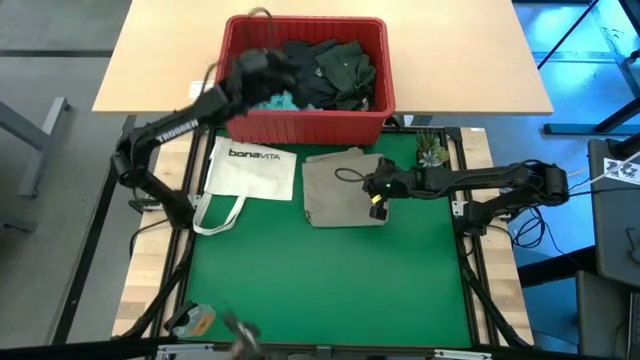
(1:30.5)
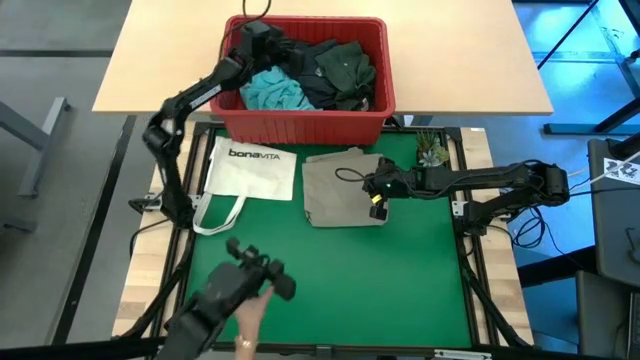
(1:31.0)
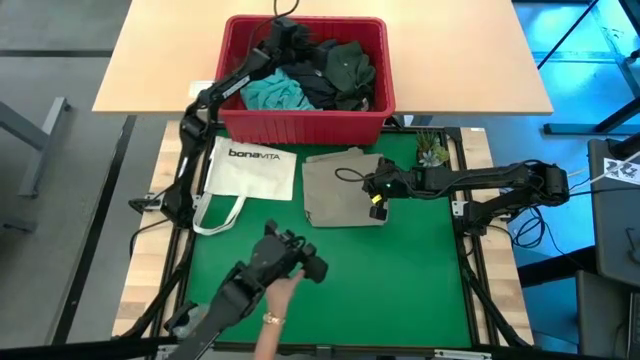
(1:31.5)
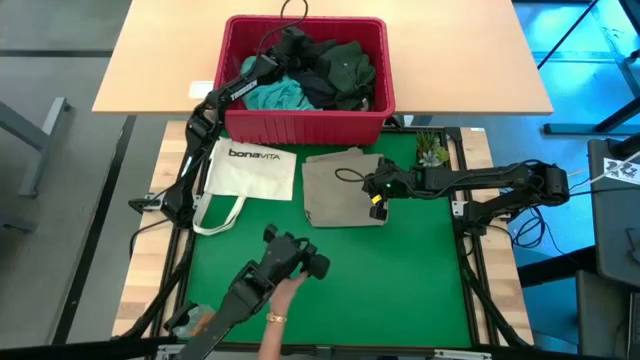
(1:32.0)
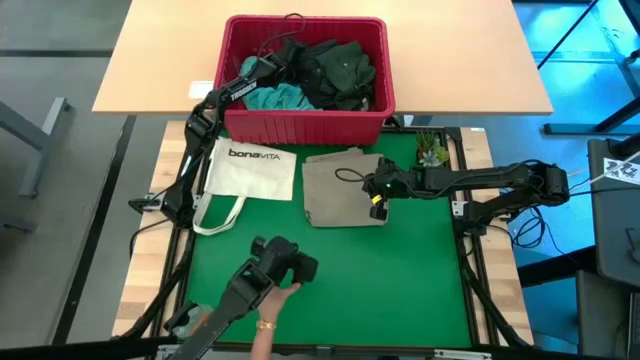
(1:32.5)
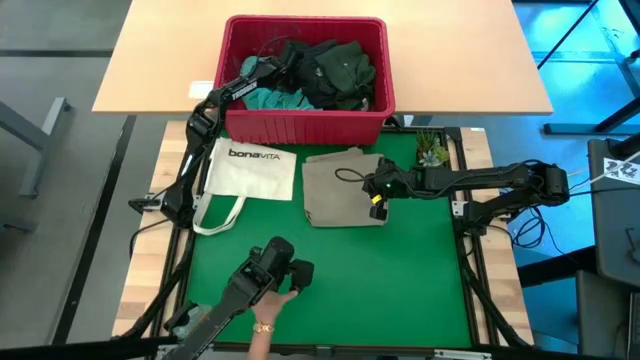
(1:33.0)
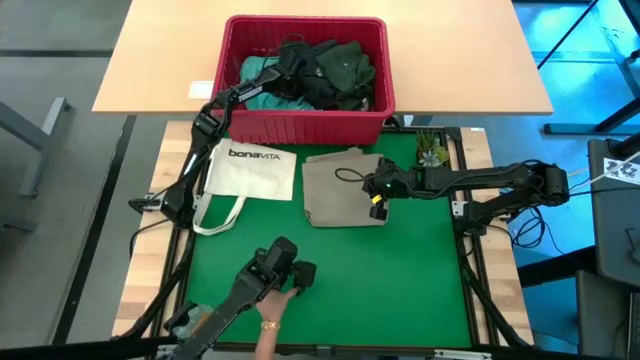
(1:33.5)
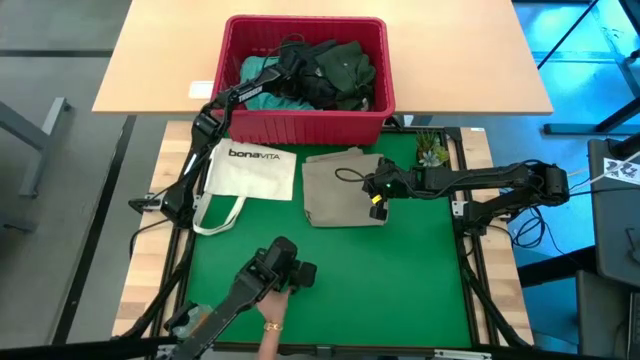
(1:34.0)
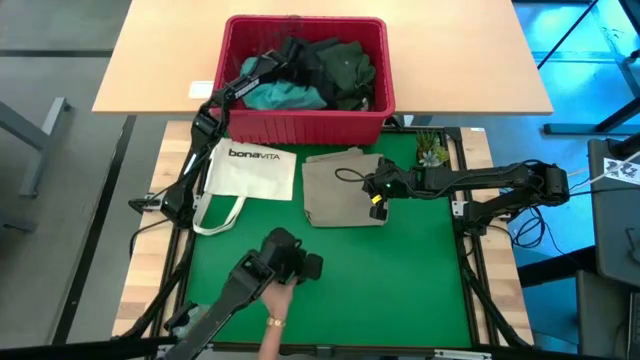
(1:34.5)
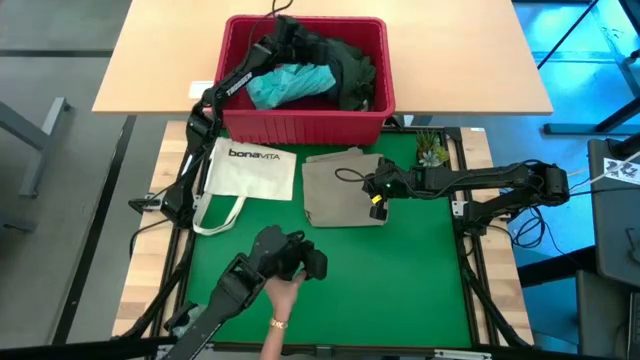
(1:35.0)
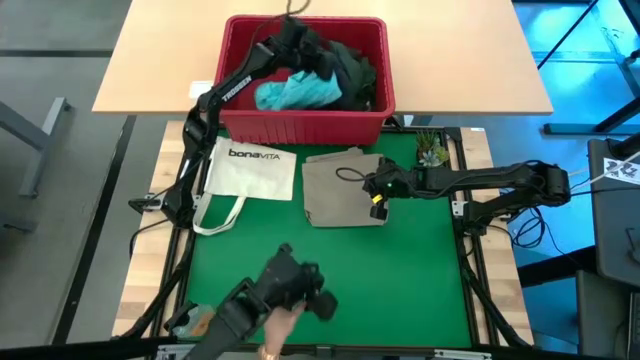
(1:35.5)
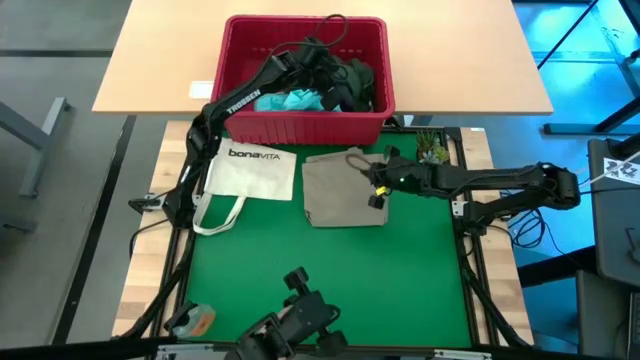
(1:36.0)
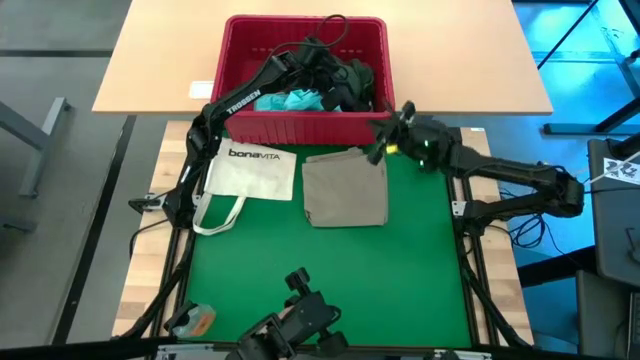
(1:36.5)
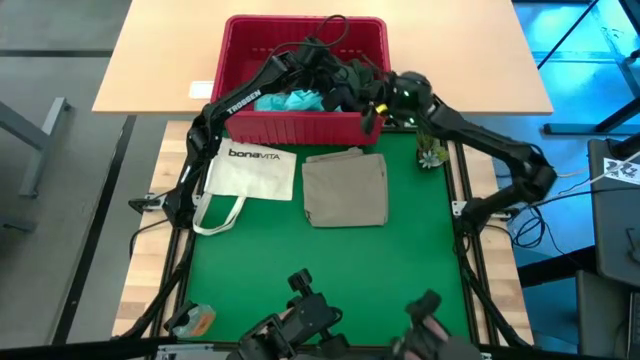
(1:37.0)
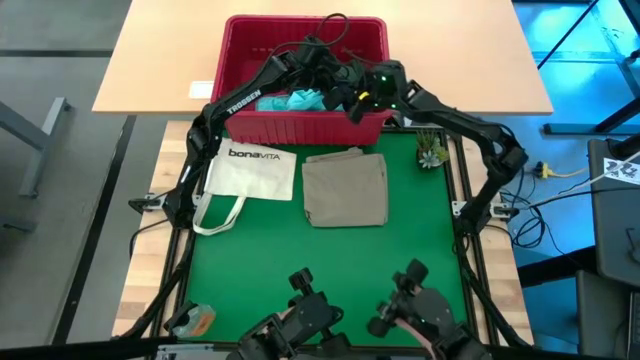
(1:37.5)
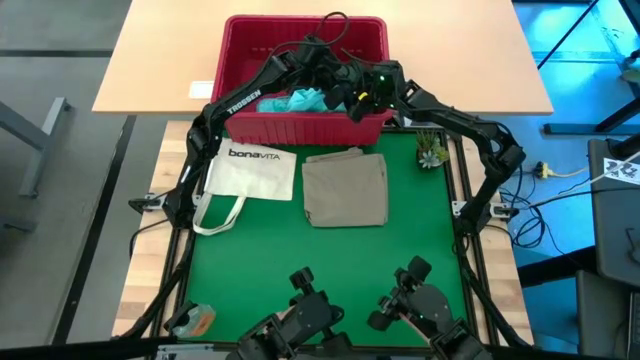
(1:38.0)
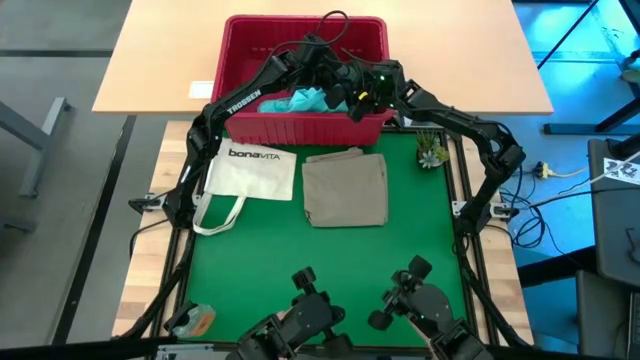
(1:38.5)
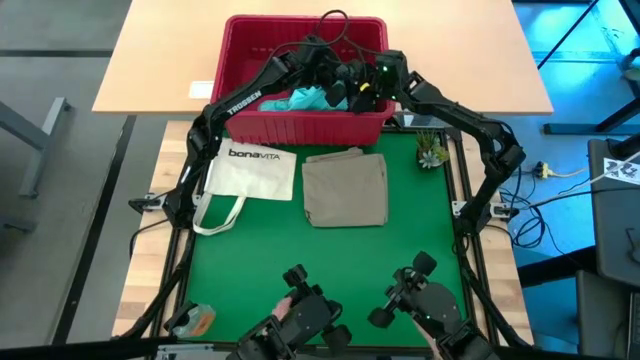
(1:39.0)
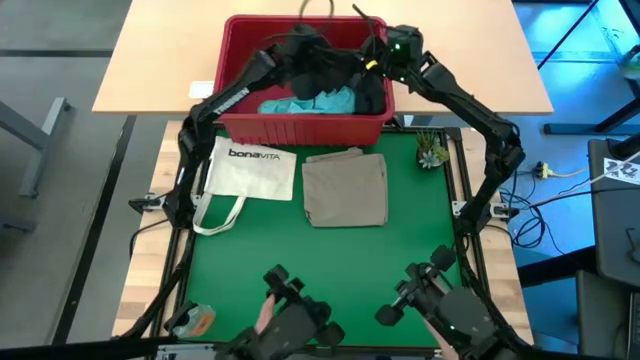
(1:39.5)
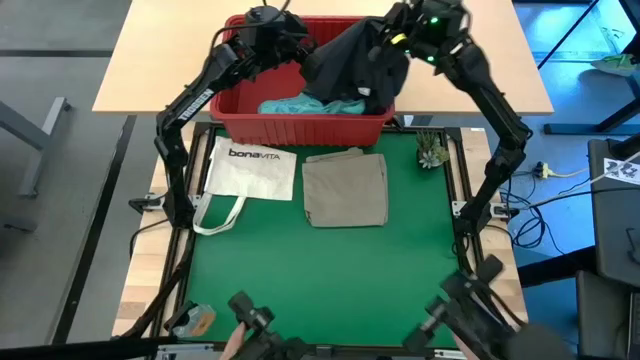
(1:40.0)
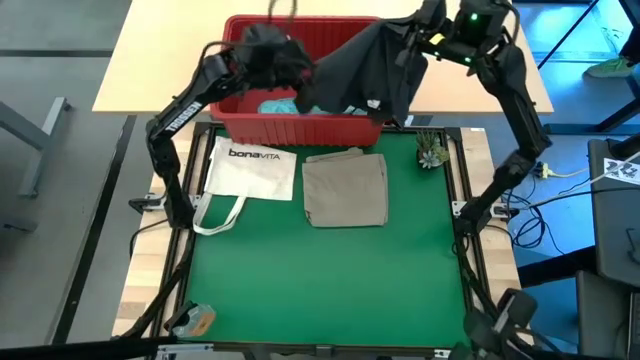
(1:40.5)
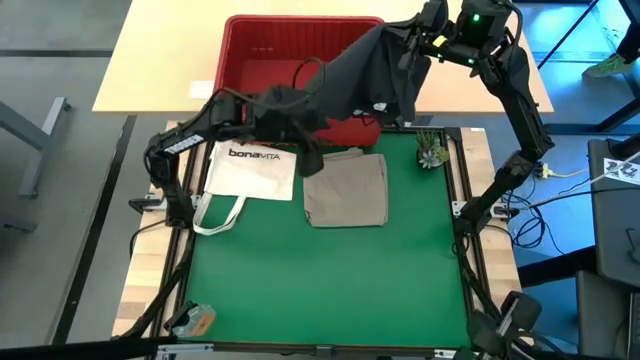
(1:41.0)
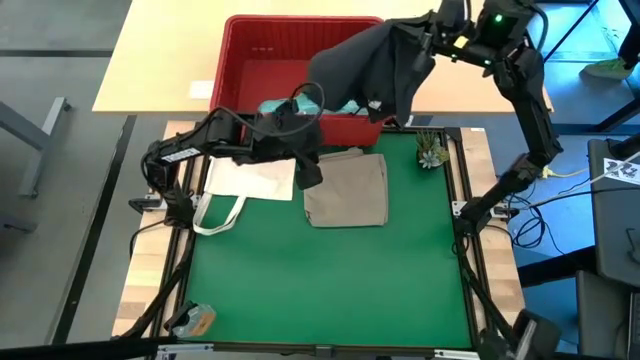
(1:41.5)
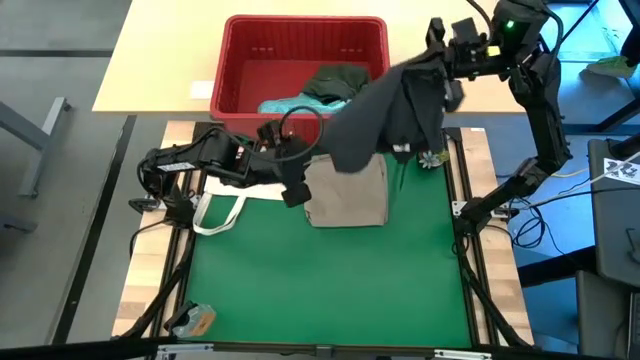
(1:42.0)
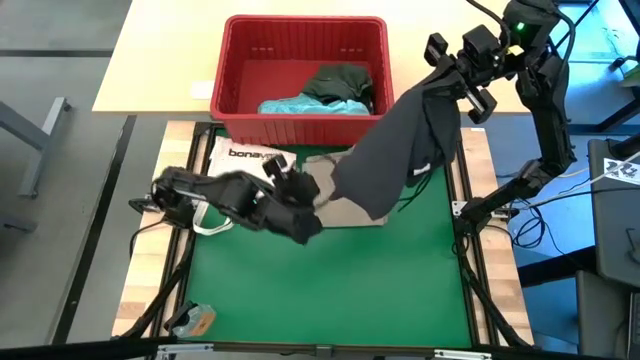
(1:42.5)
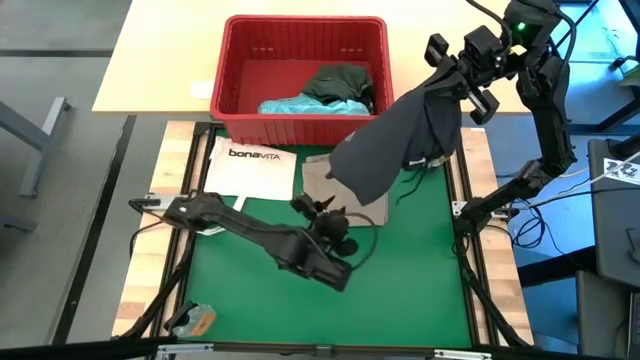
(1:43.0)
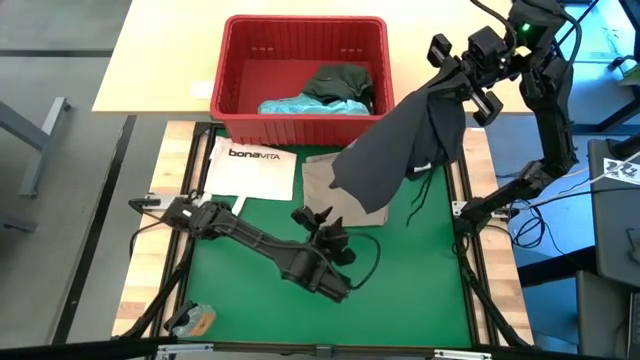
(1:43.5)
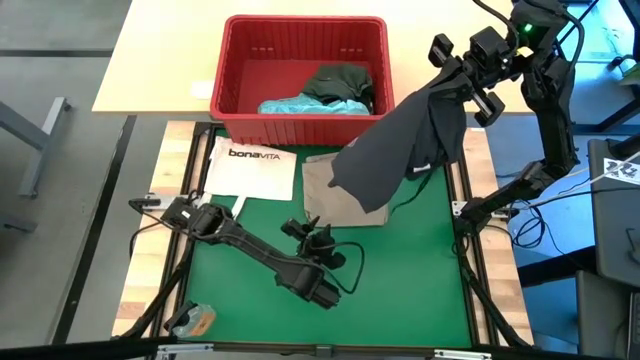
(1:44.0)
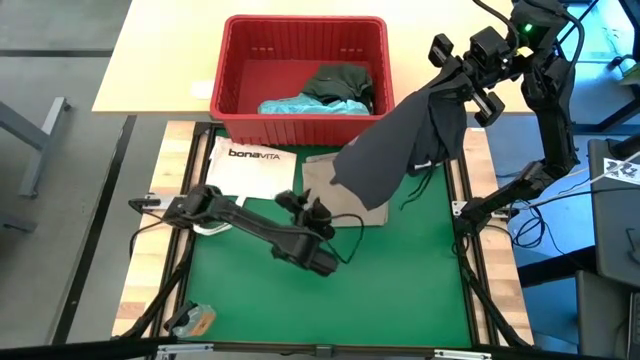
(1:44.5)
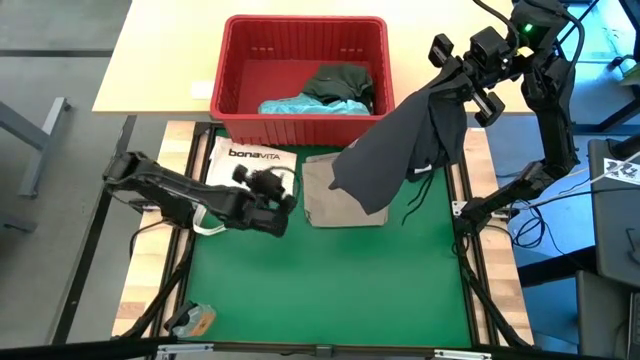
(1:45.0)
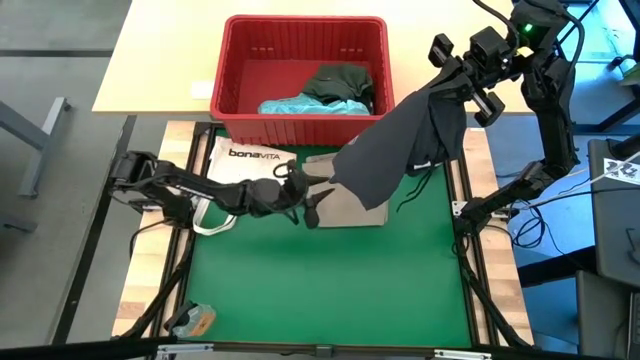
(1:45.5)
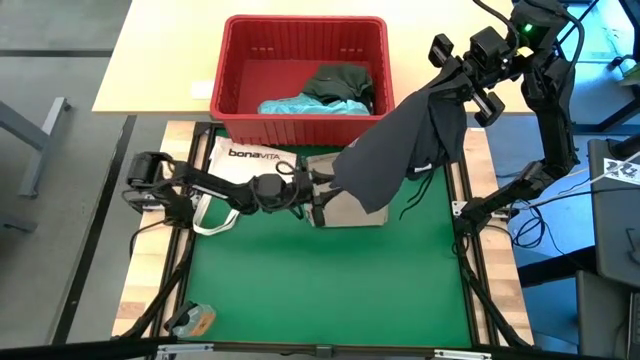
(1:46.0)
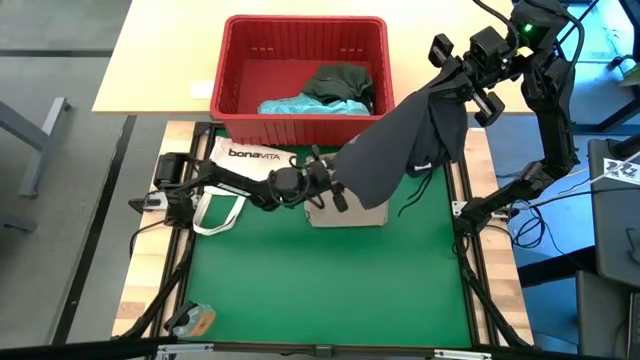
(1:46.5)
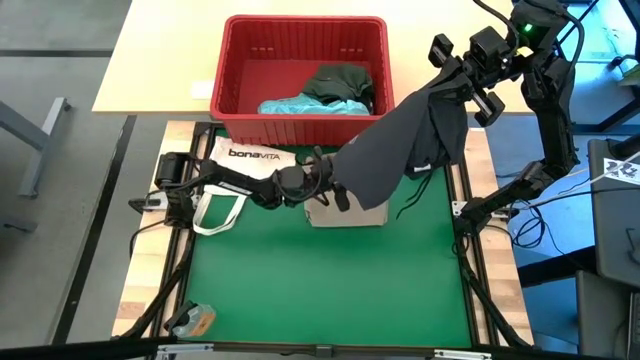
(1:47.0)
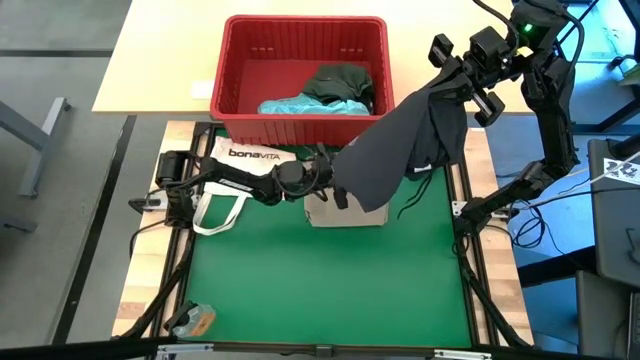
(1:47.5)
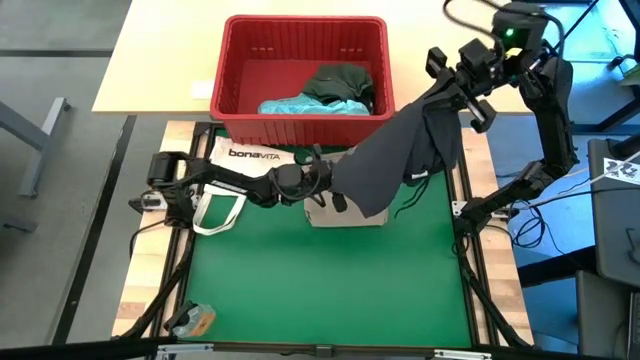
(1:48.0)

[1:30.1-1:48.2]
Task: Fold Laundry from Bin
Remove the black shorts from the red laundry bin

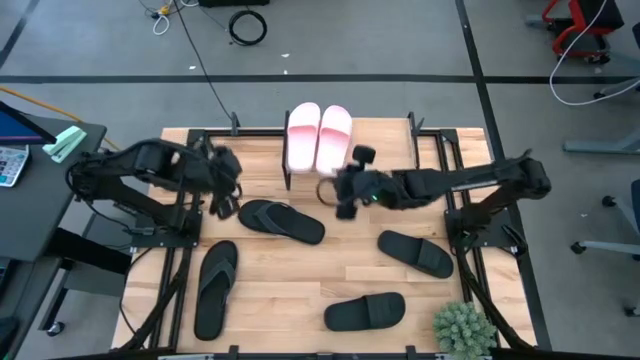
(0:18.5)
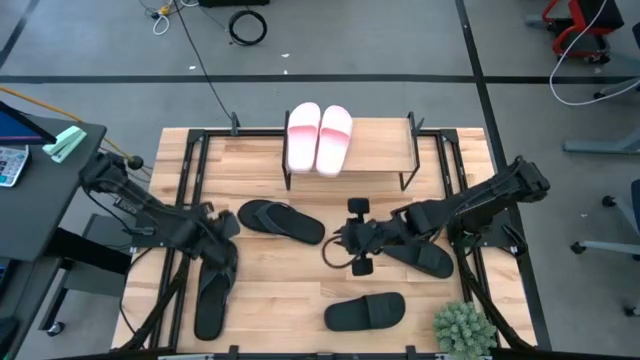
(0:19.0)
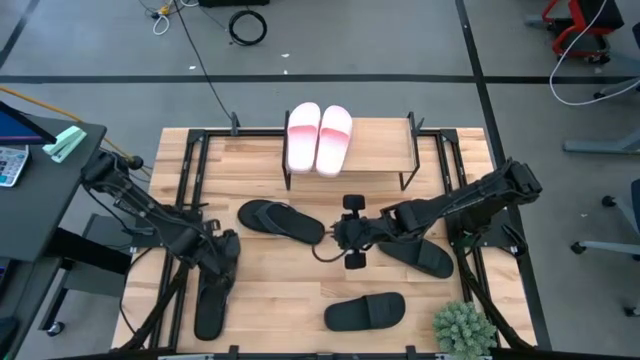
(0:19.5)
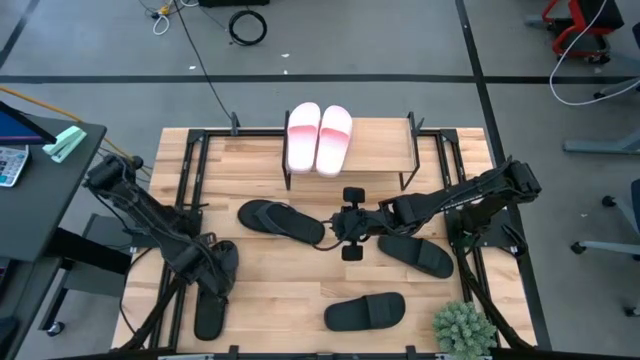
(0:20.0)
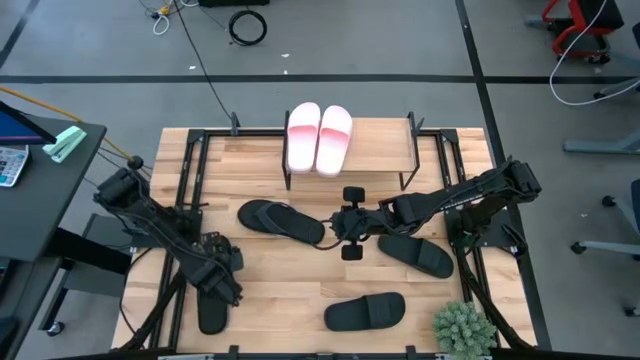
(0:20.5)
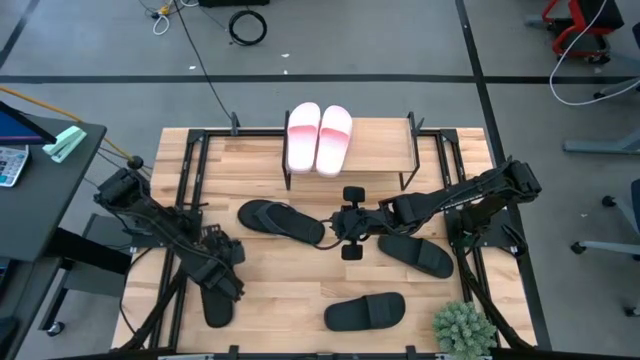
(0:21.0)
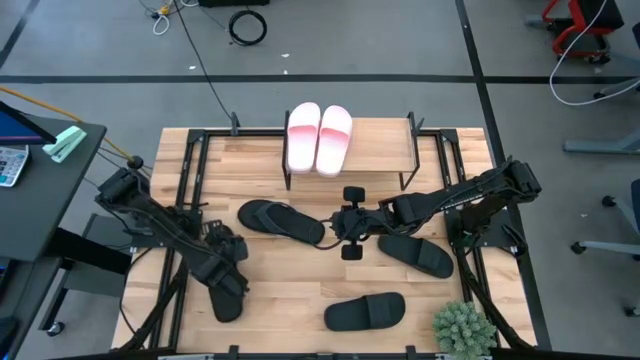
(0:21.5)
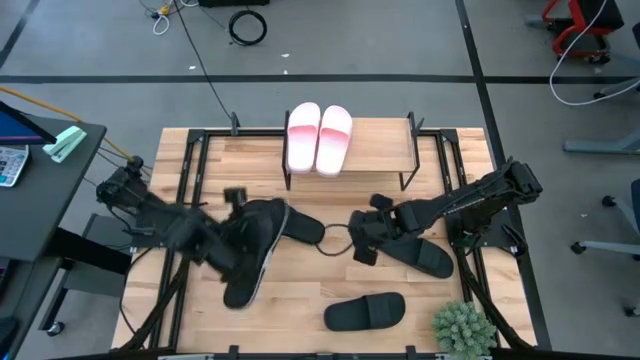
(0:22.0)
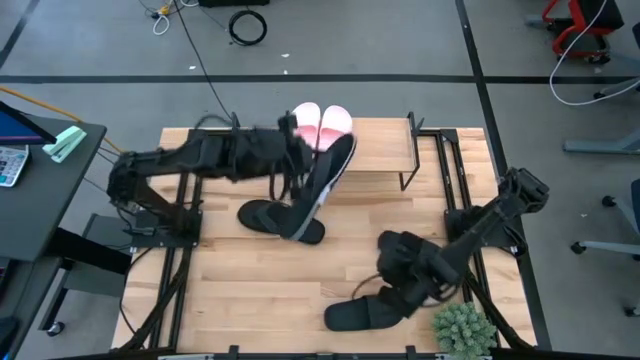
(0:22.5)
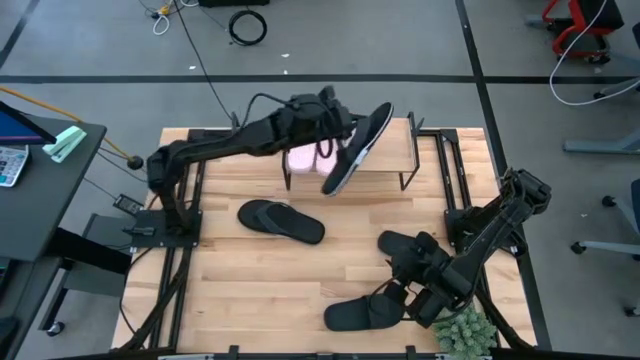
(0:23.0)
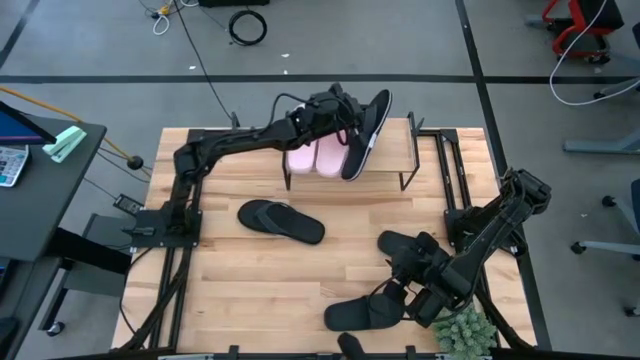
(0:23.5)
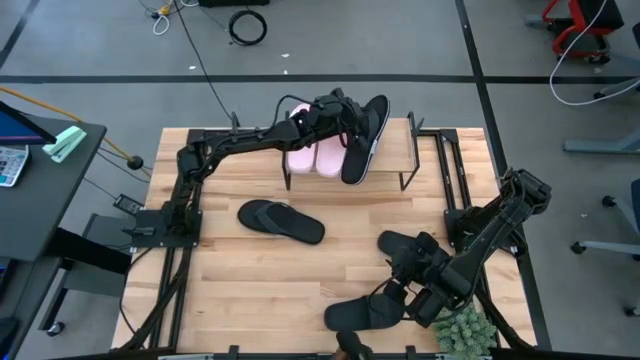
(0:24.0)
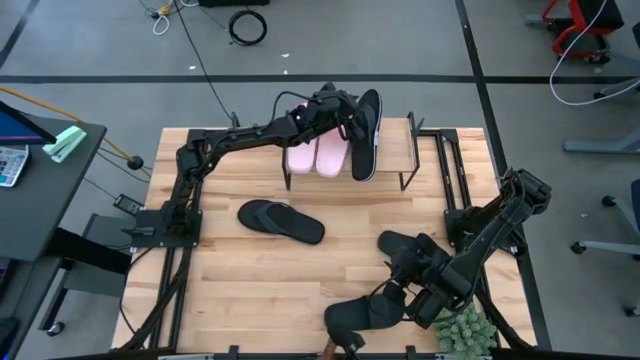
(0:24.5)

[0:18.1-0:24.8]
Task: Pick and place slides into the shelf
Put the left black slipper on the shelf
